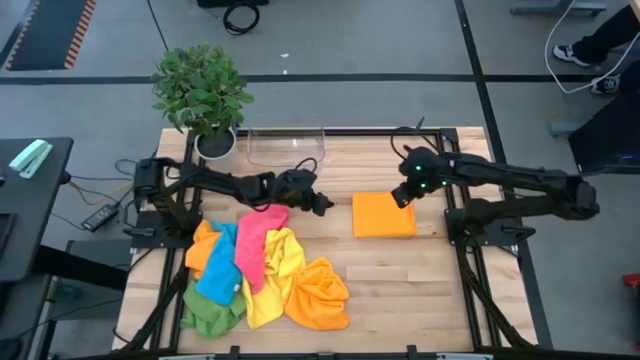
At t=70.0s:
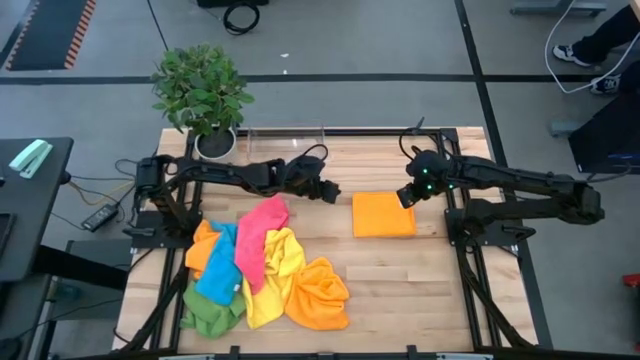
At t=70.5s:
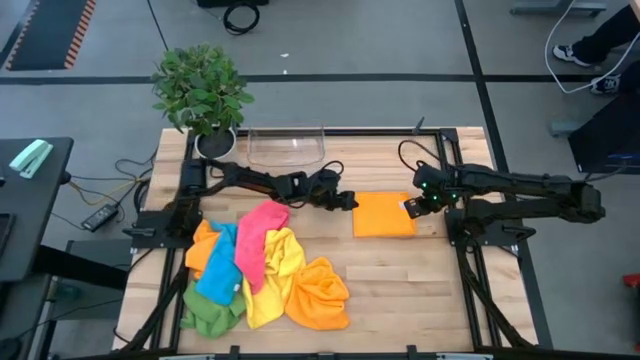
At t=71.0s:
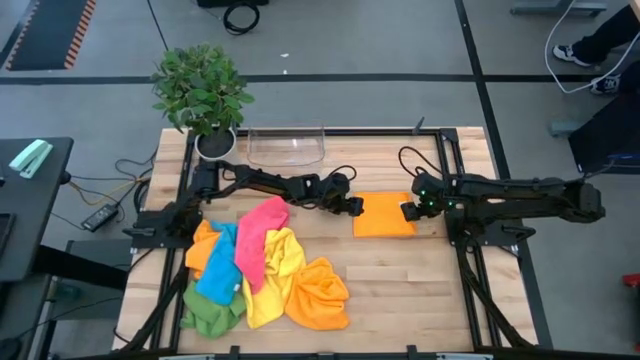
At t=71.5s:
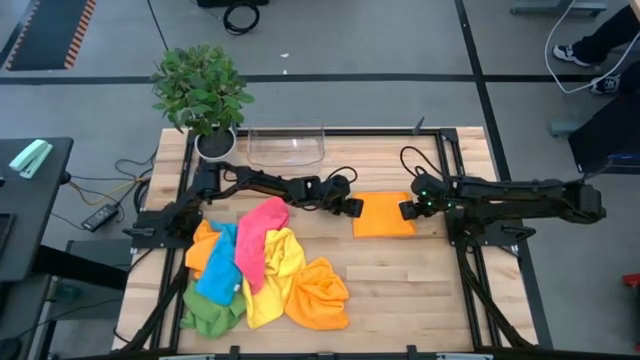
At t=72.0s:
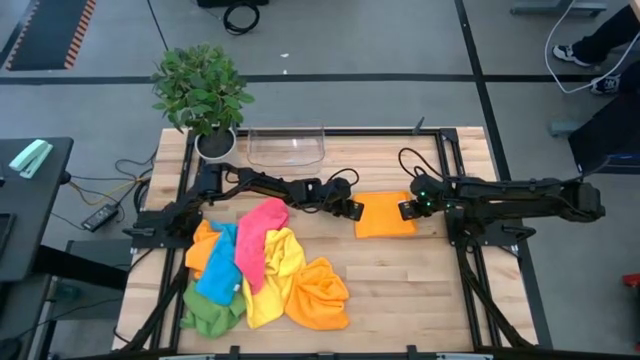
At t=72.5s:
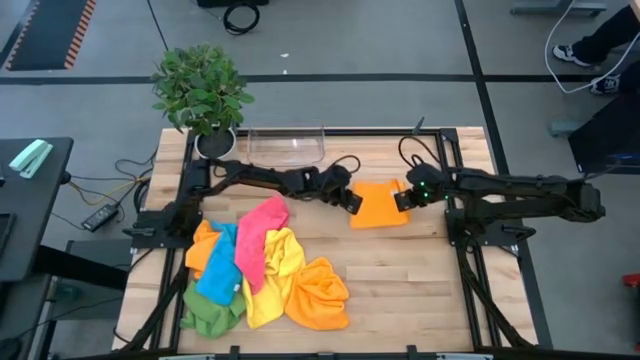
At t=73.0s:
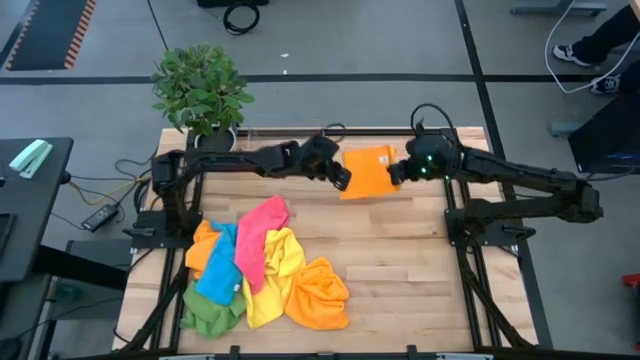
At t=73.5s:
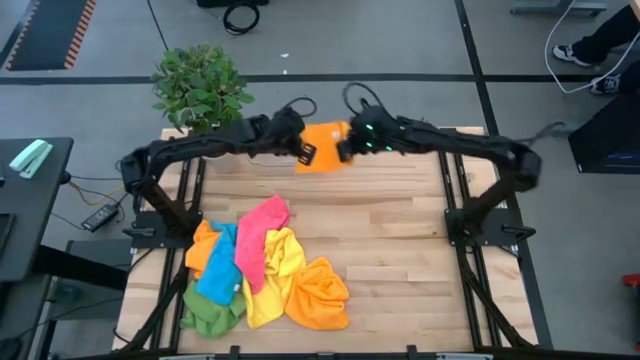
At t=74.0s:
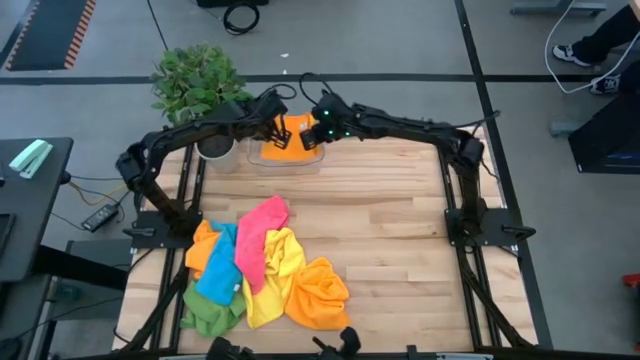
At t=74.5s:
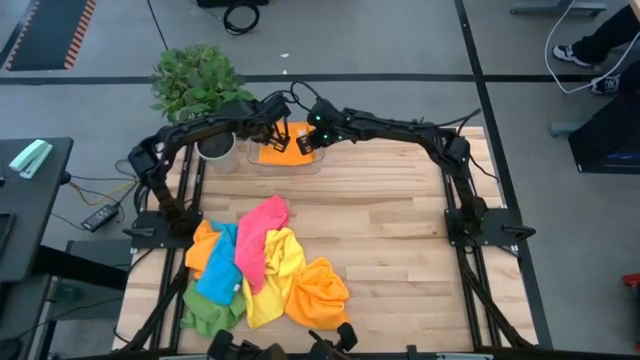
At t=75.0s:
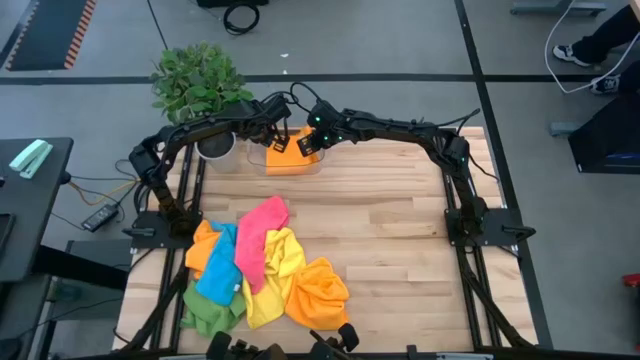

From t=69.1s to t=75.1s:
Task: Fold microfiber towels
Put the folded top right orange microfiber cloth into the transparent bin

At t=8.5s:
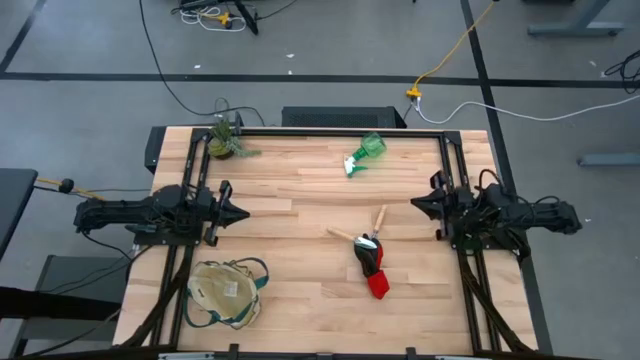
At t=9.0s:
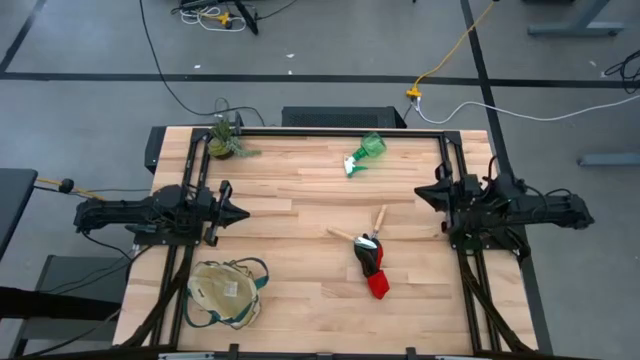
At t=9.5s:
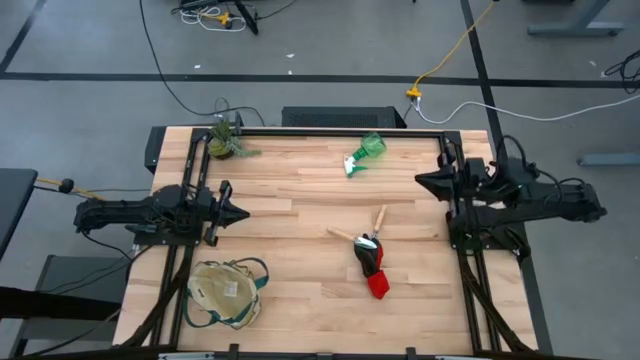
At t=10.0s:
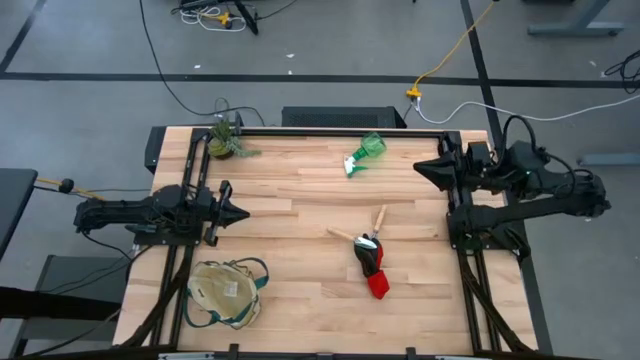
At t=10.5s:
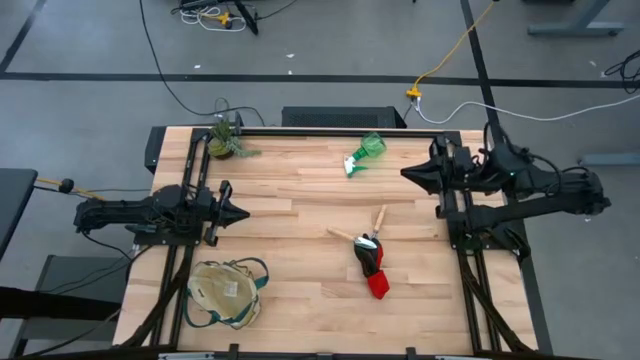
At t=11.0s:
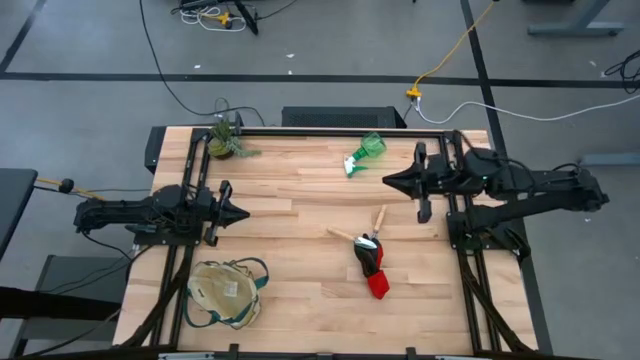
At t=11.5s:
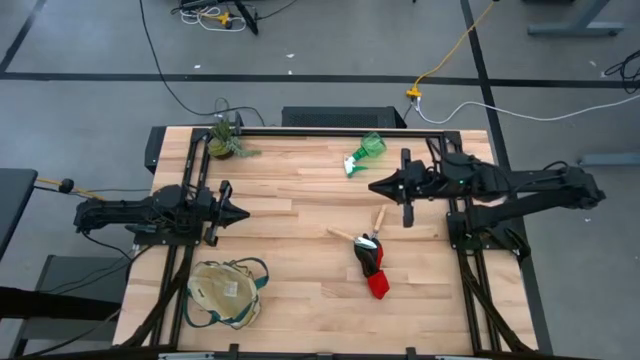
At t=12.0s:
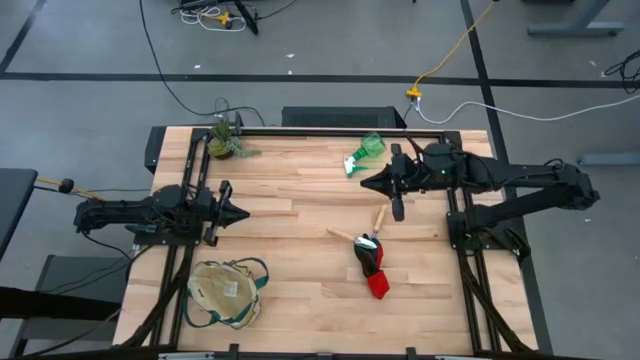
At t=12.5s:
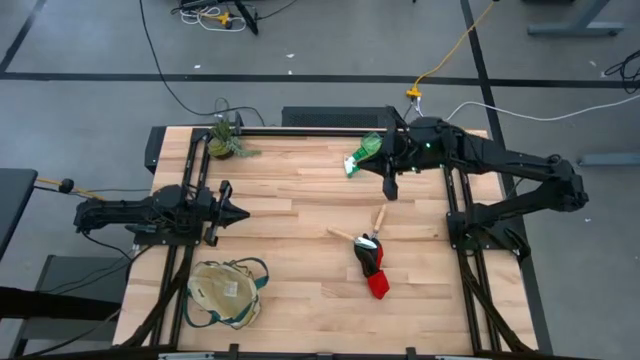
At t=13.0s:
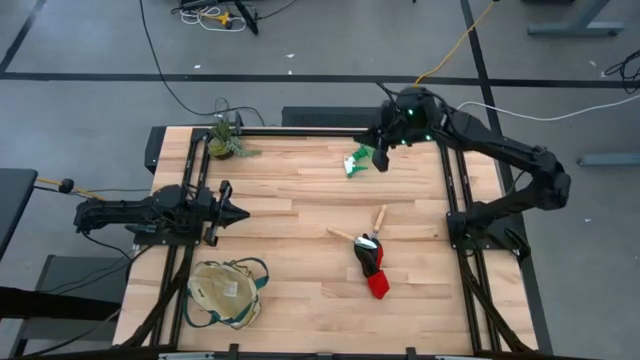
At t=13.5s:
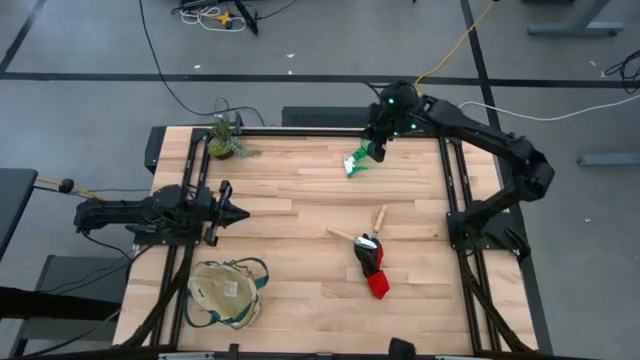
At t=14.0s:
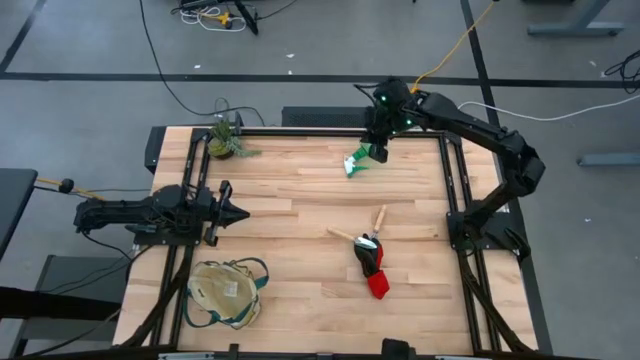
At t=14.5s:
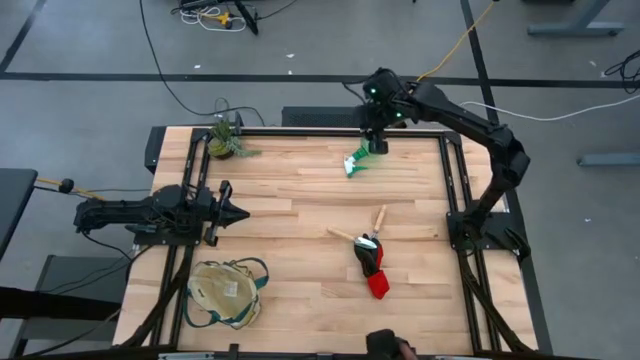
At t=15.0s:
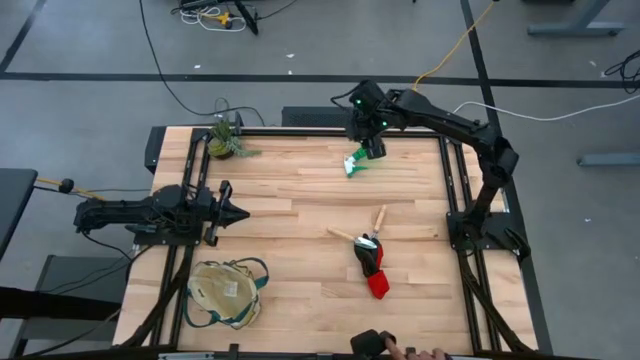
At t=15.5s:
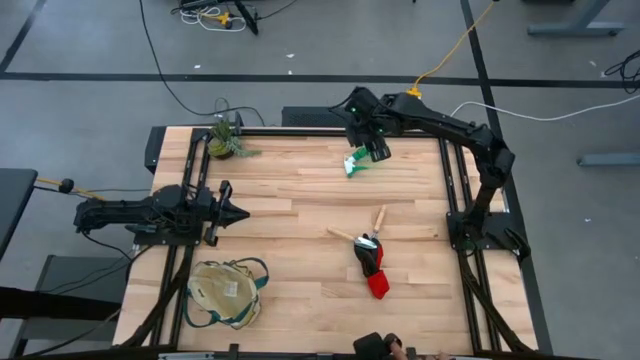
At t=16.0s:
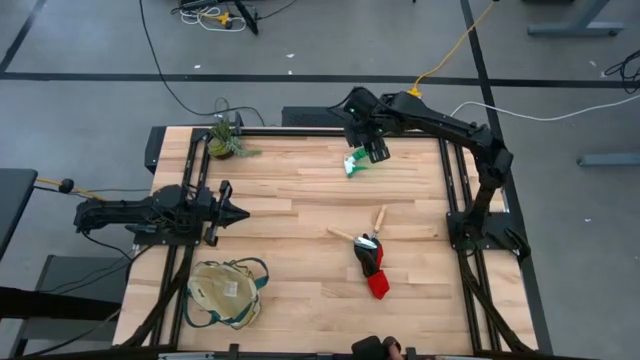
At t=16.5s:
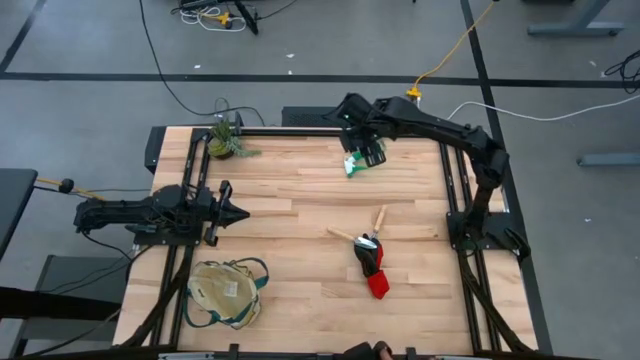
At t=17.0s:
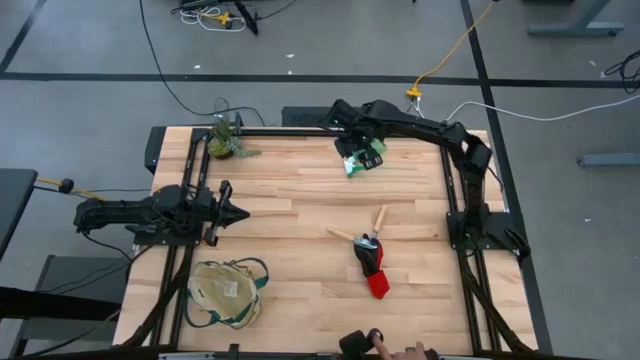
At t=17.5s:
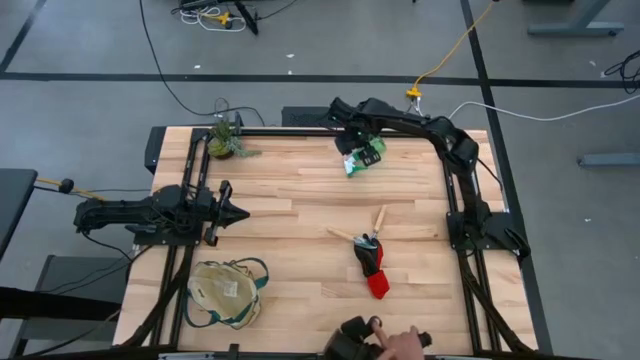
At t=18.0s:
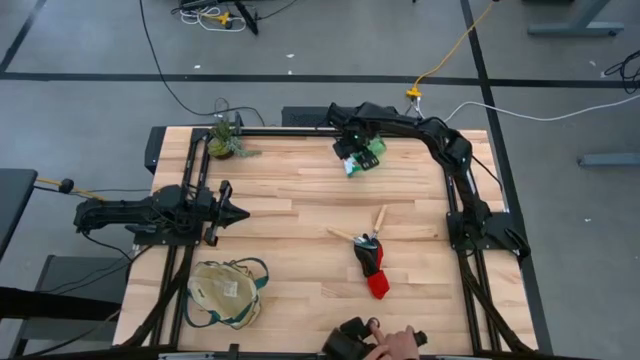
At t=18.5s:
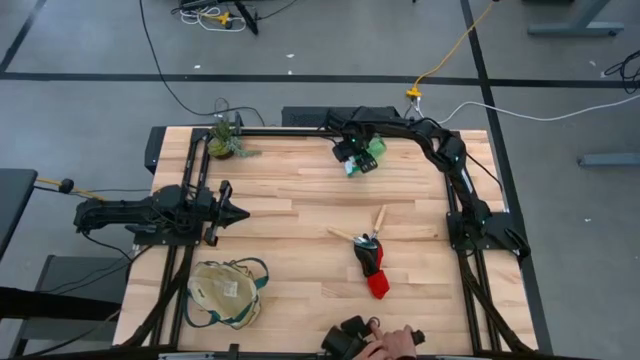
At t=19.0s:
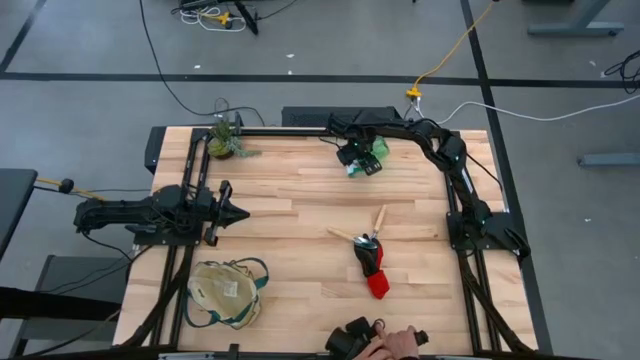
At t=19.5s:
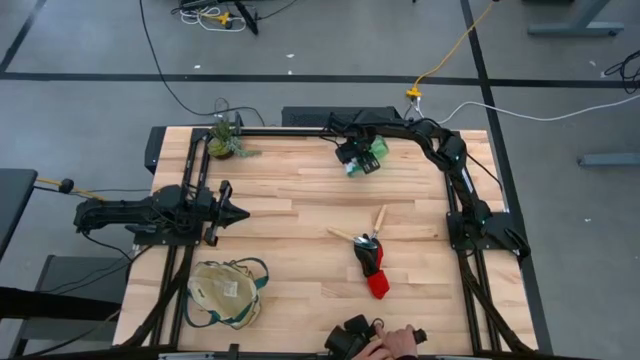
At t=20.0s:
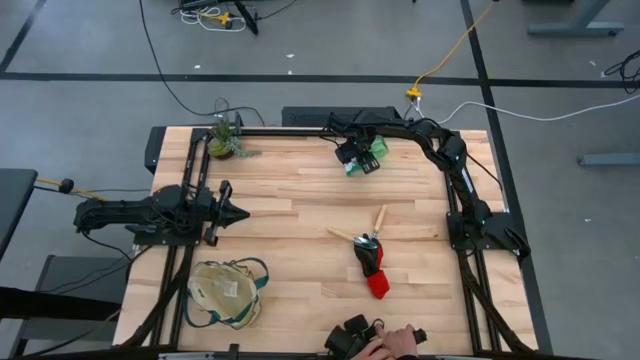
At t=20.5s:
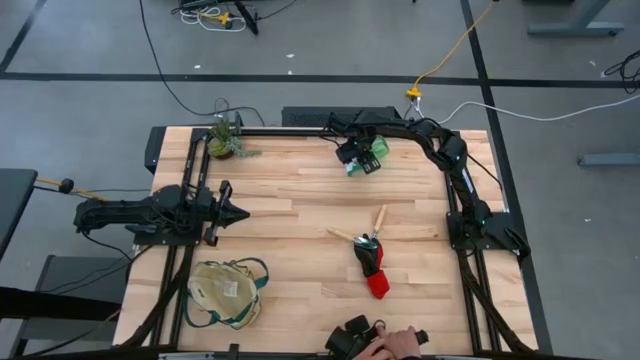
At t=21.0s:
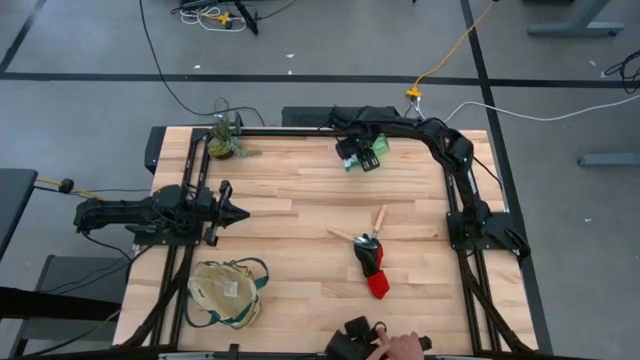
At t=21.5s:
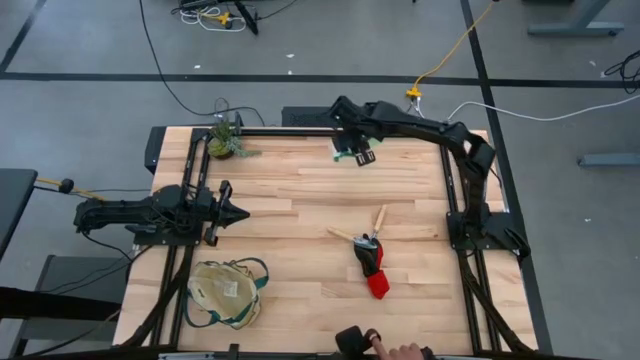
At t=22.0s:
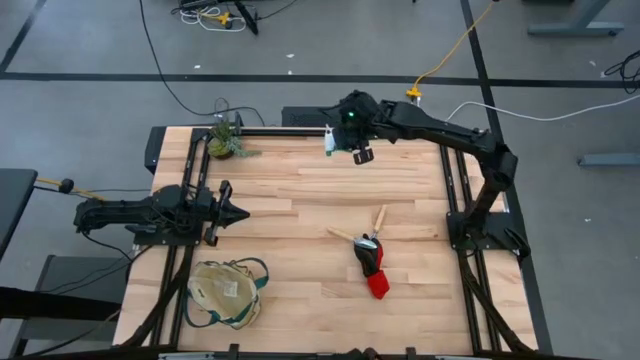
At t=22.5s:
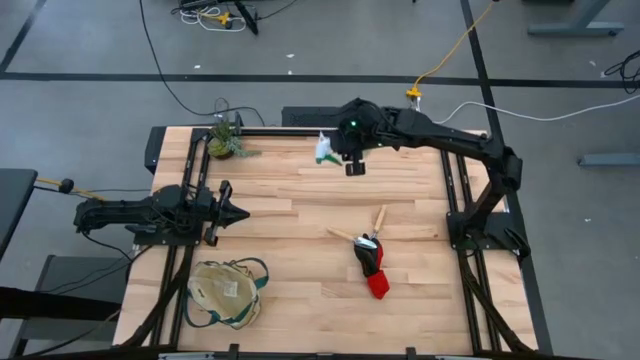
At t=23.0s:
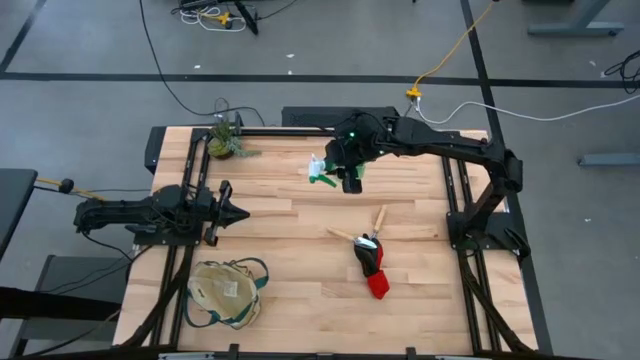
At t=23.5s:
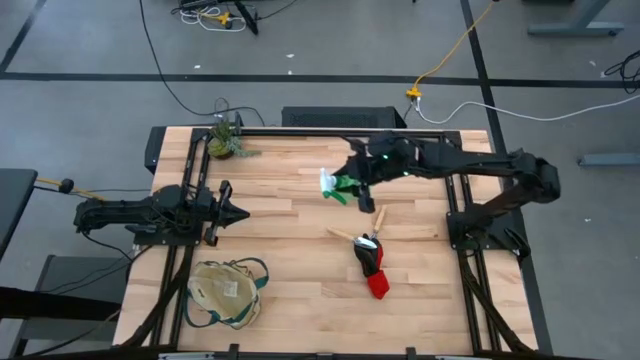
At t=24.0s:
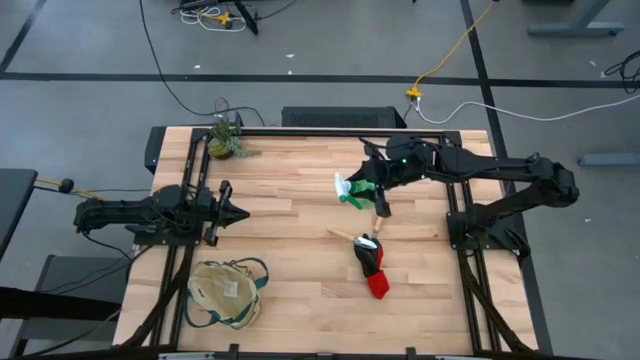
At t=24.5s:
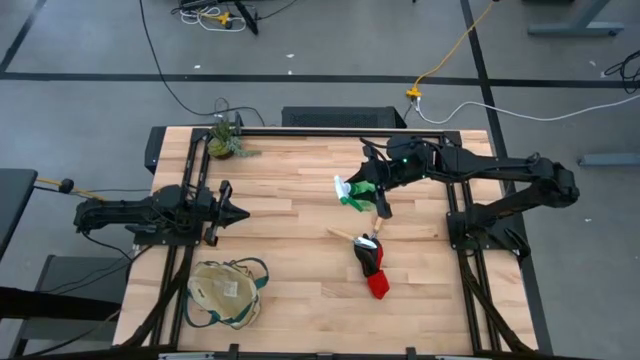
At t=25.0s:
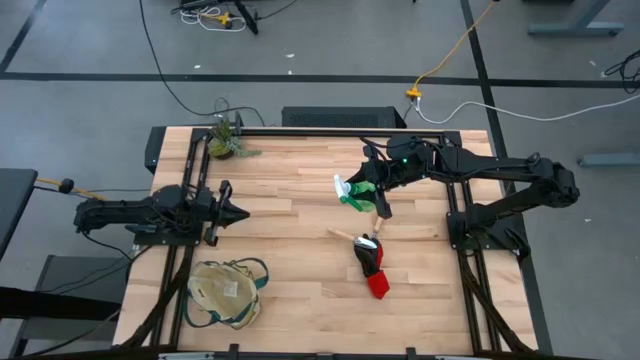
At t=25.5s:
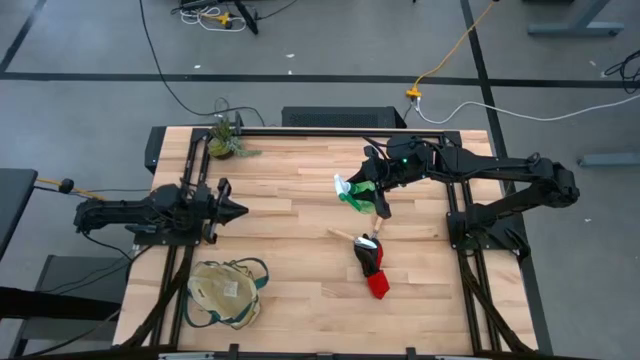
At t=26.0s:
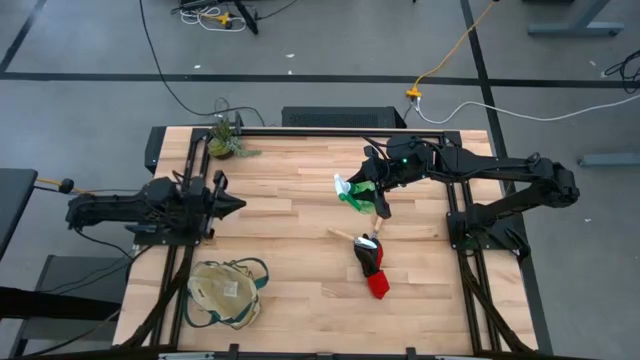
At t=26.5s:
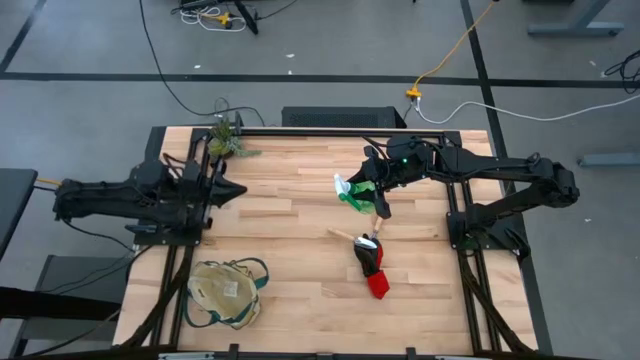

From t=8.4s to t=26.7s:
Task: Pick & Place Garden tools in Gardening bag
Put the green spray bottle into the white gardening bag
